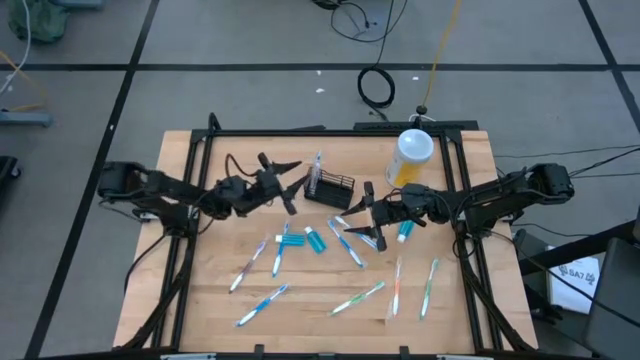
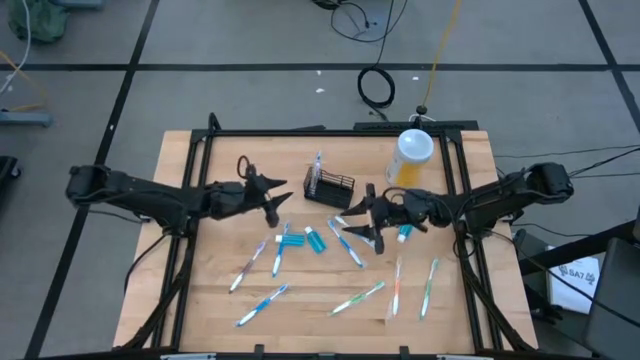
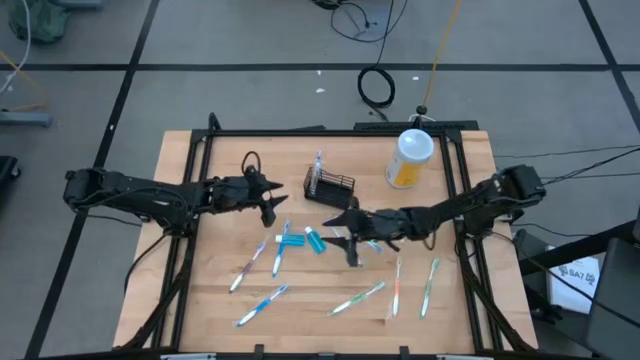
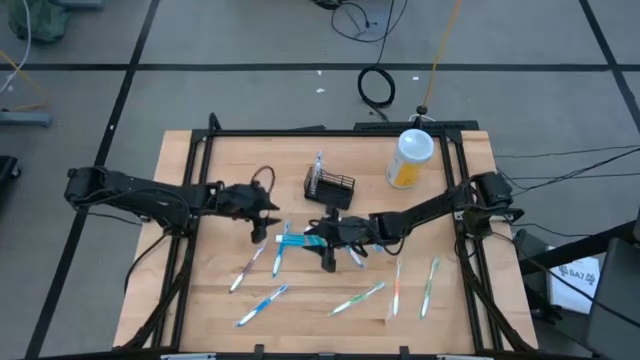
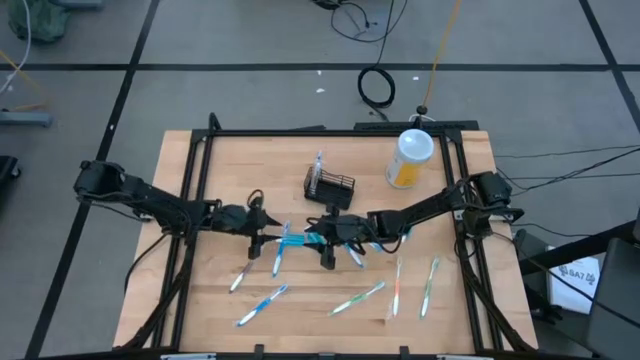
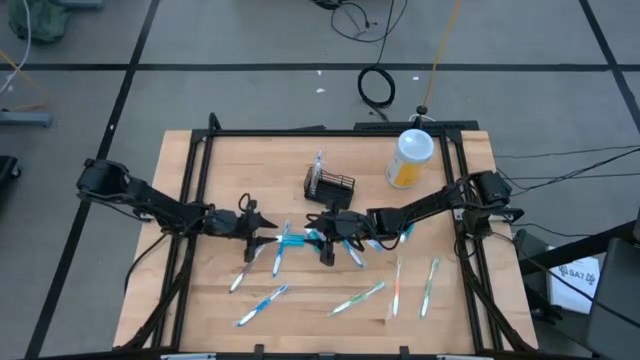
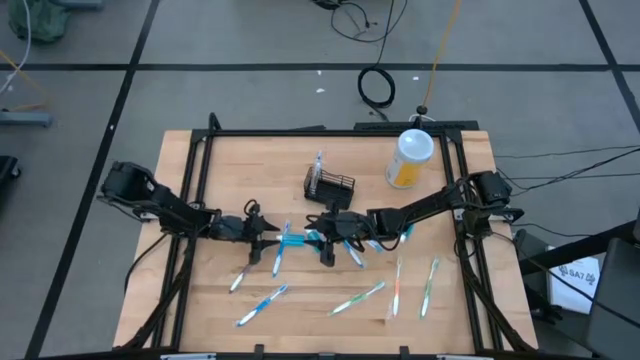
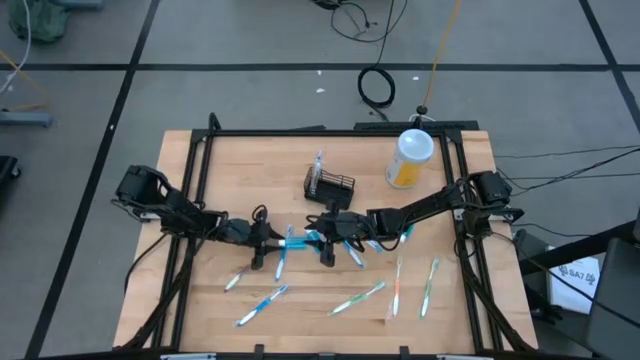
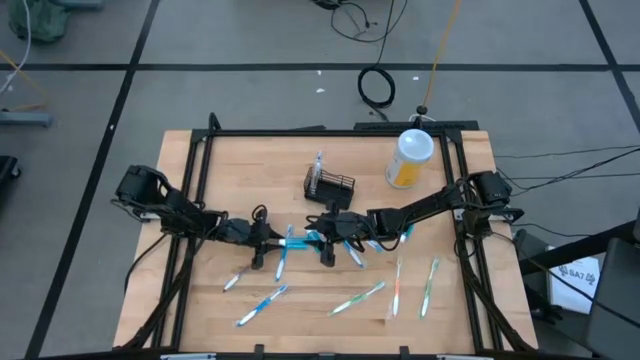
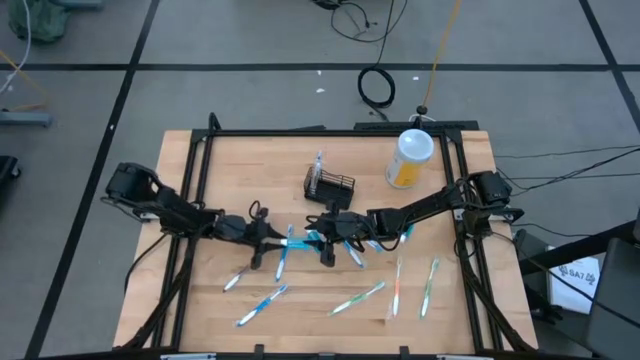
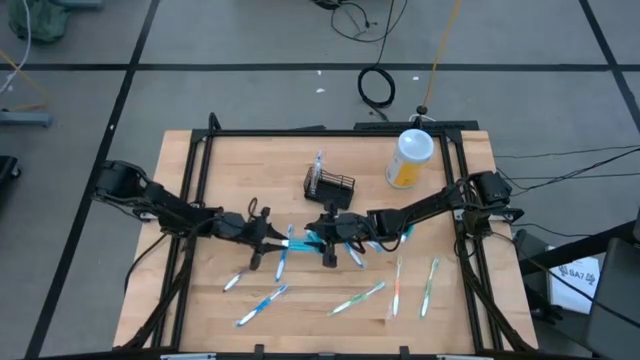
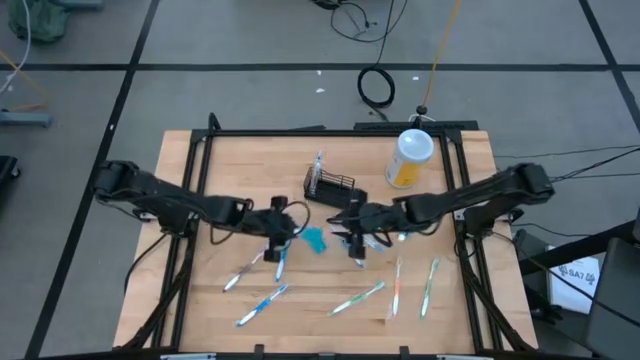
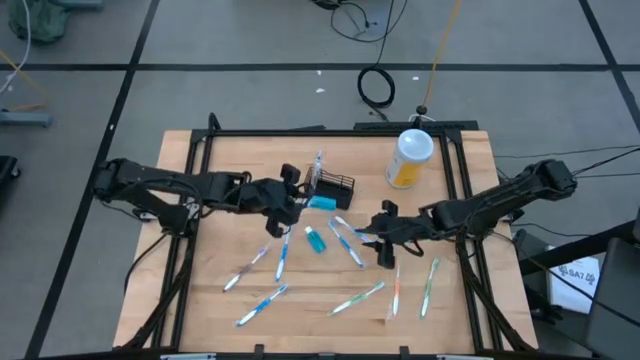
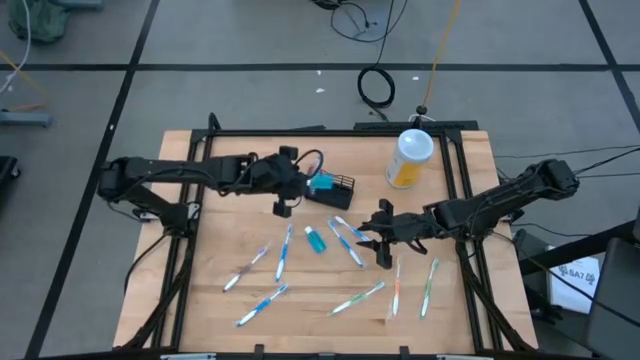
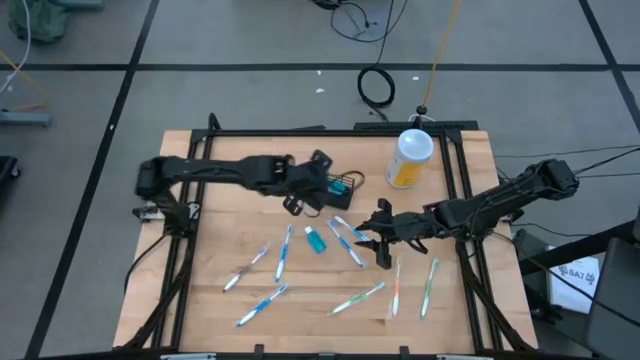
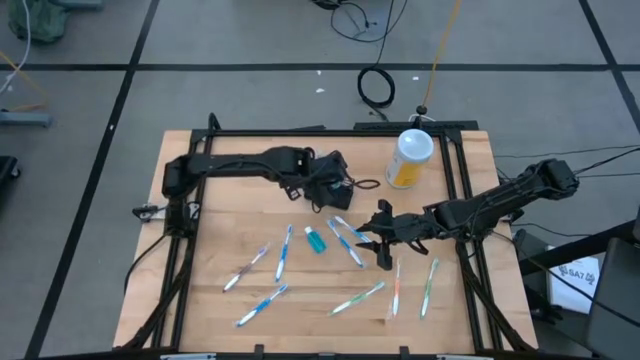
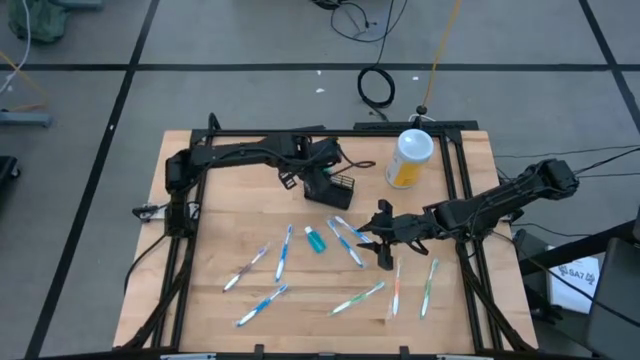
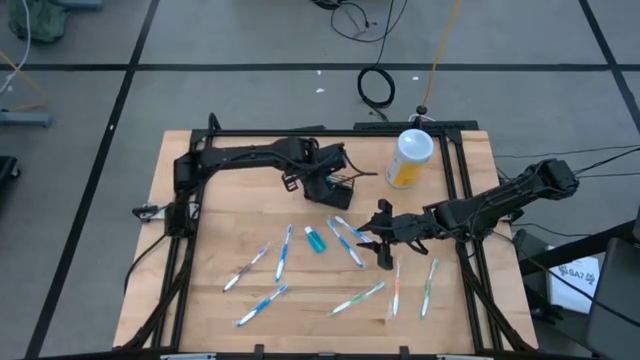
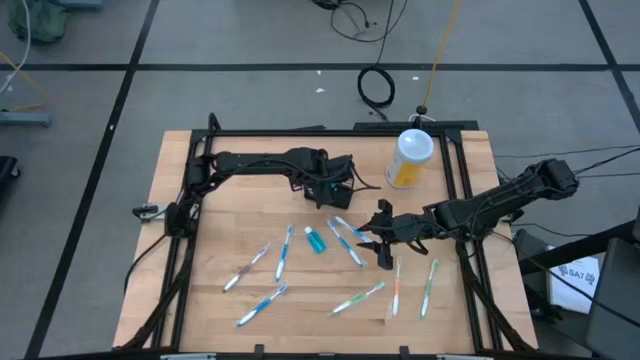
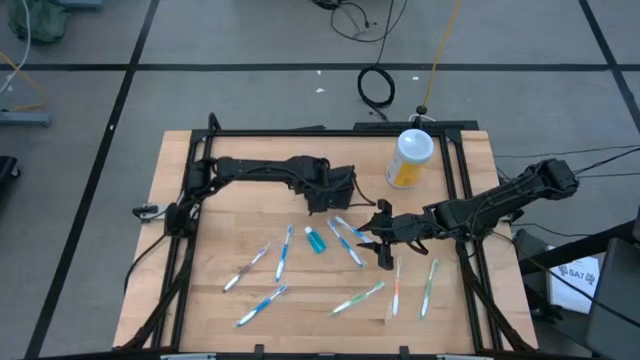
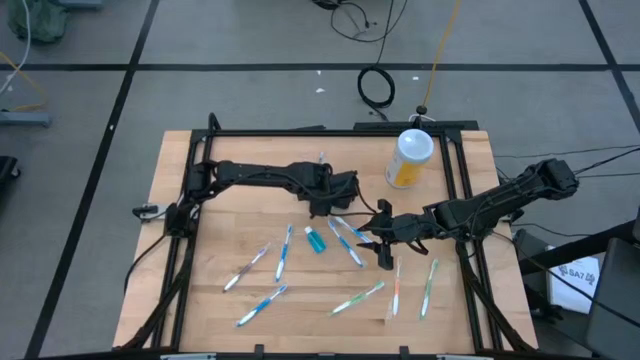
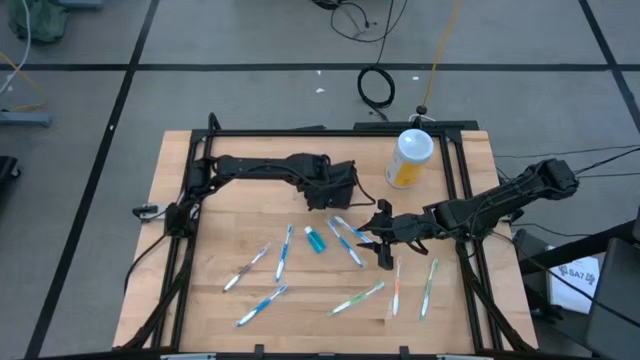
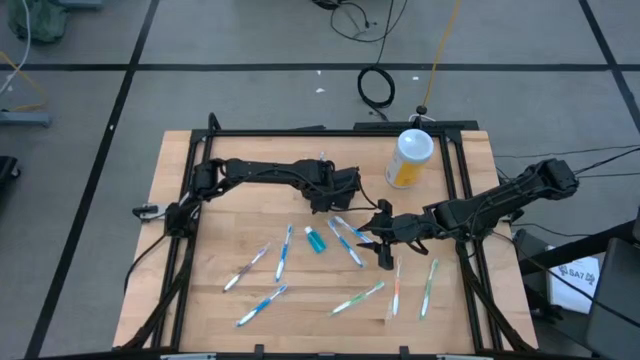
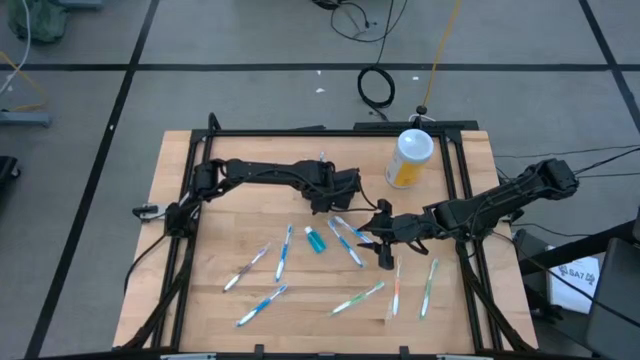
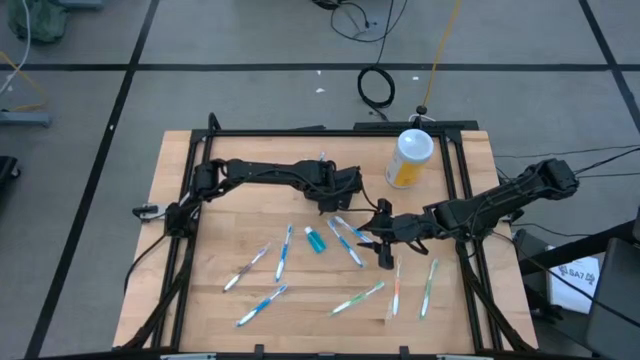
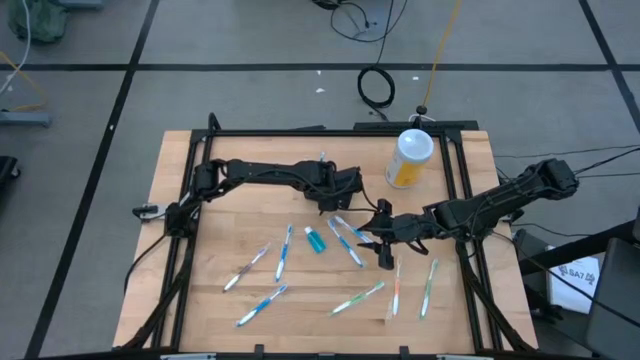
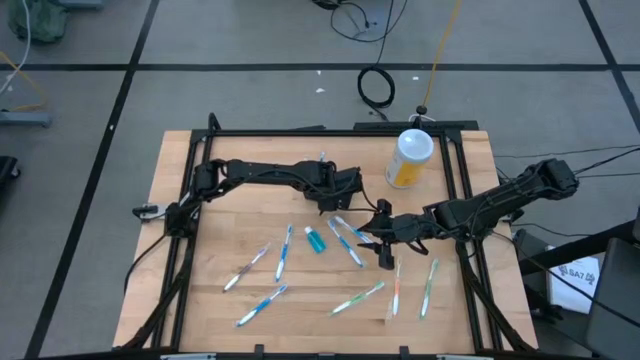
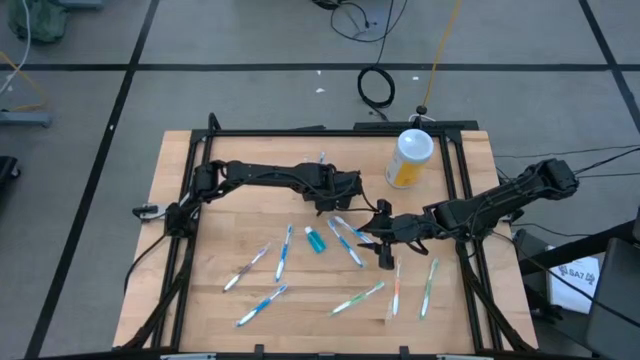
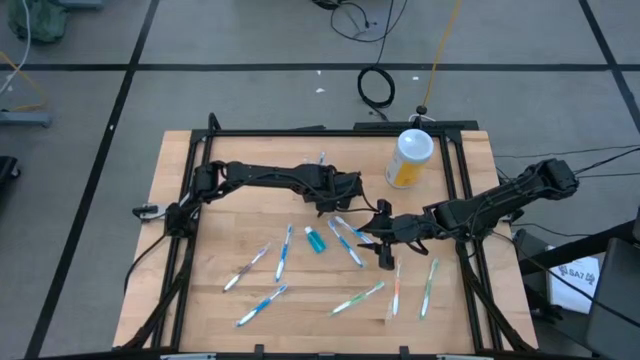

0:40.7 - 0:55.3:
Task: Pick & Place toothbrushing station
Put the blue mouthwash into the black wire organizer

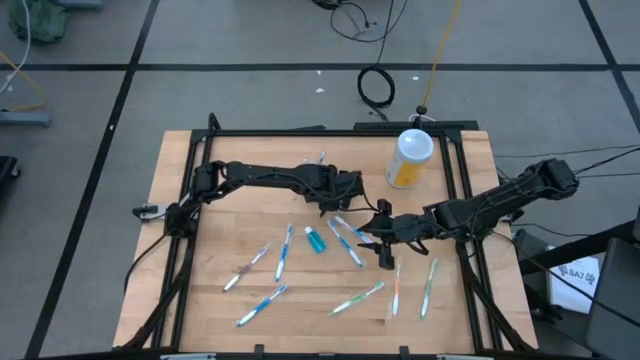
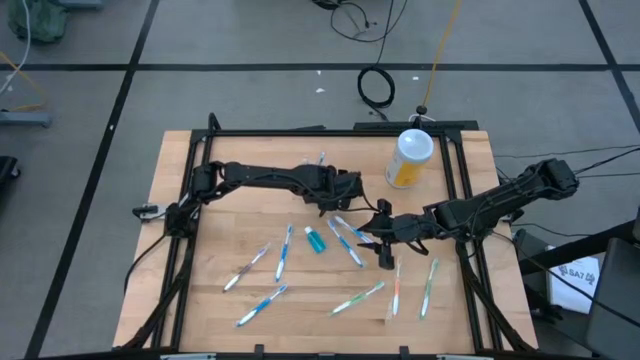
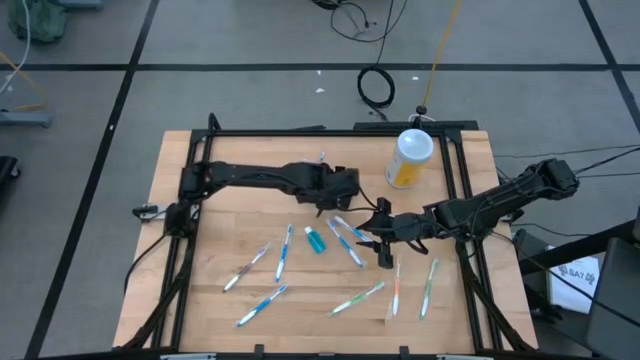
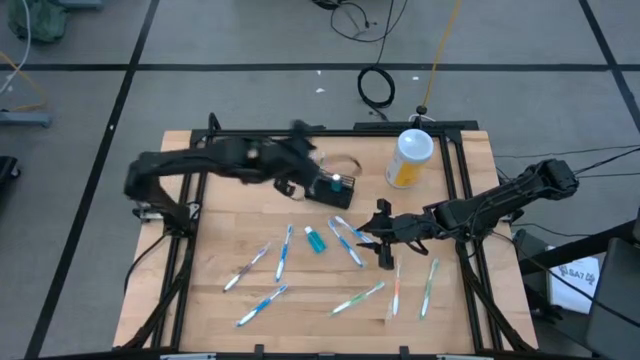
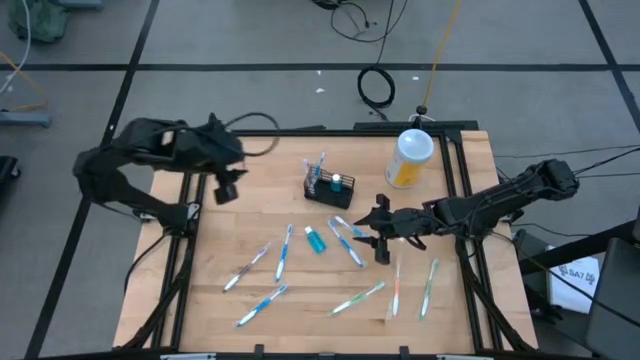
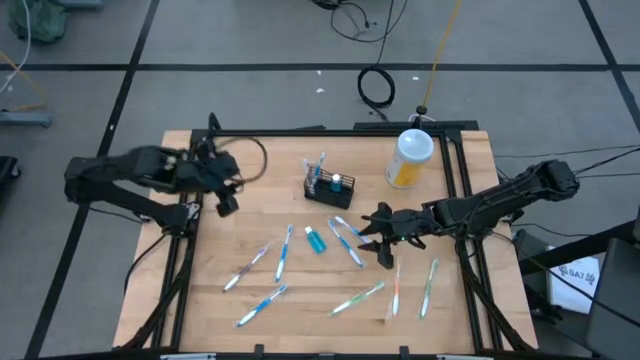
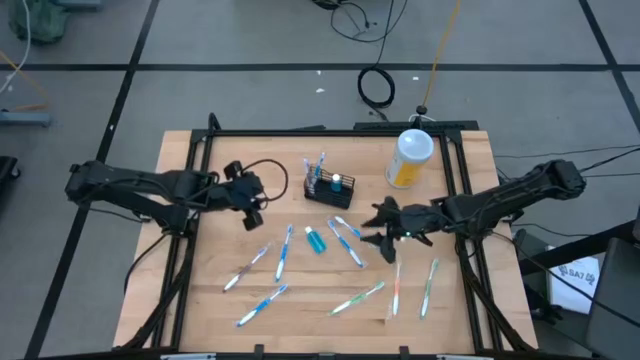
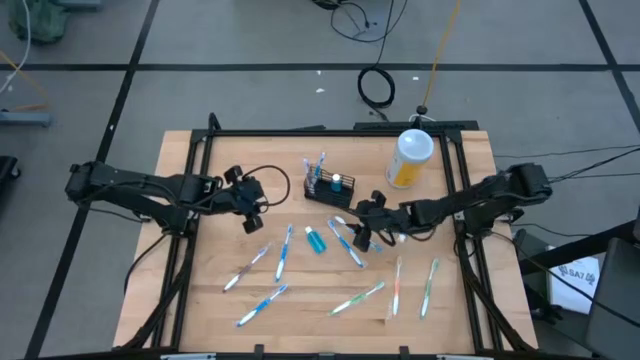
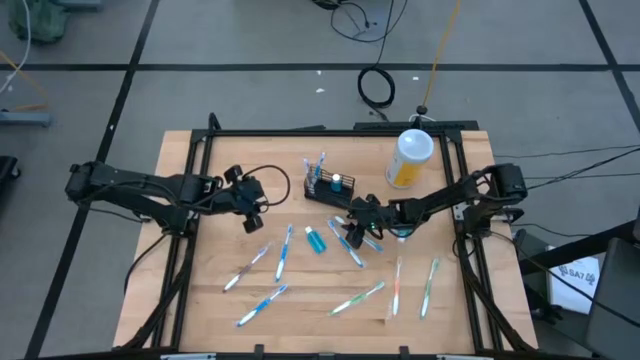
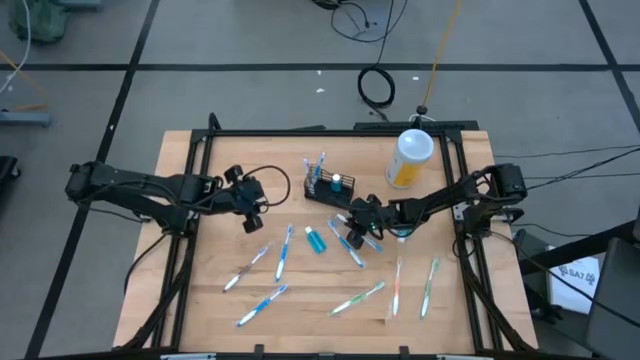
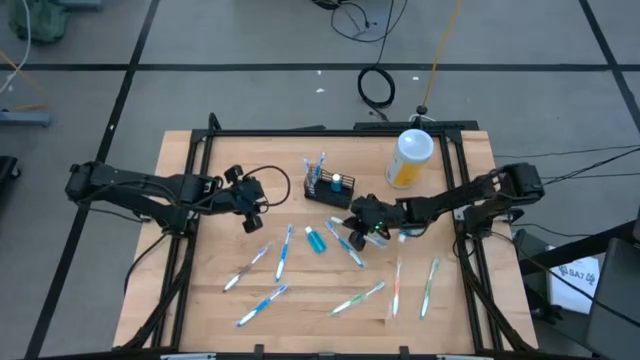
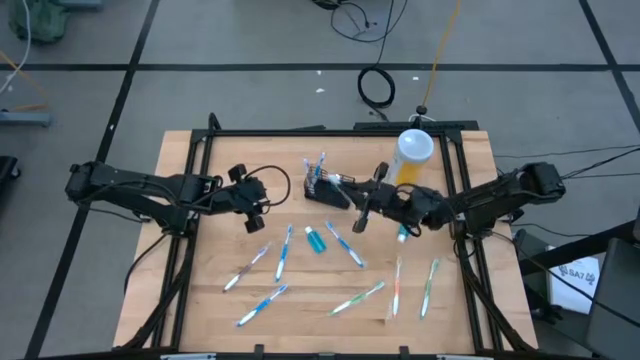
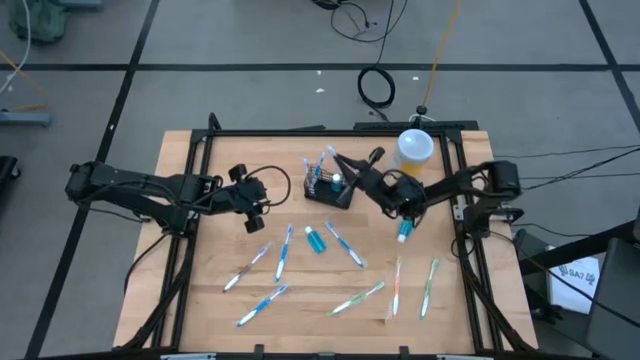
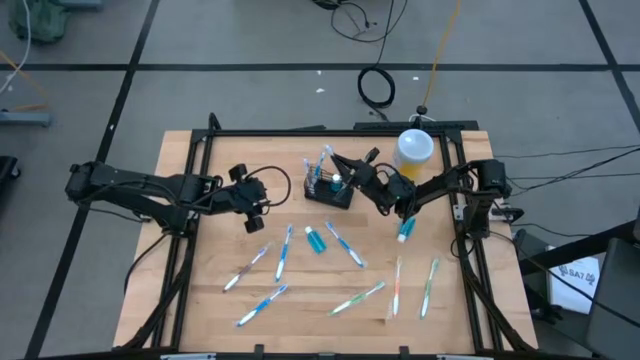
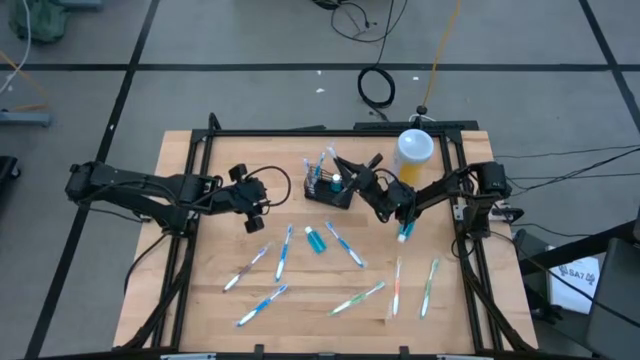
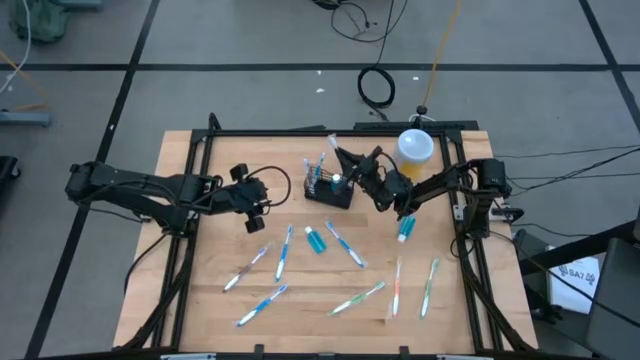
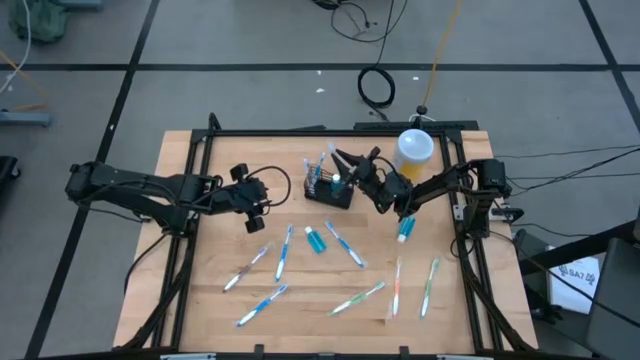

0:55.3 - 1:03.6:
Put the blue toothbrush into the black wire organizer
